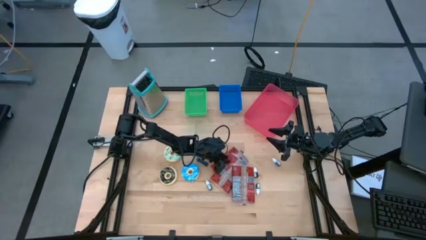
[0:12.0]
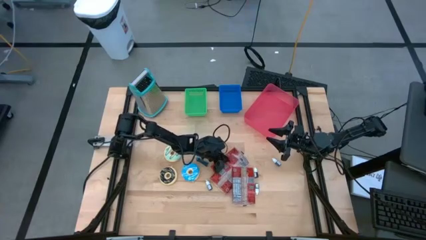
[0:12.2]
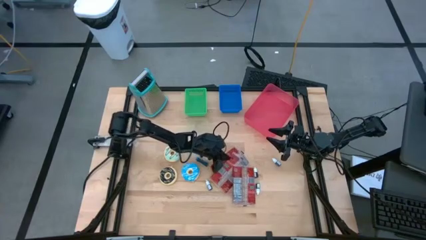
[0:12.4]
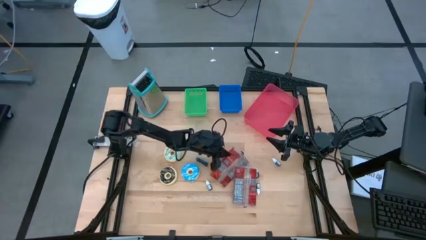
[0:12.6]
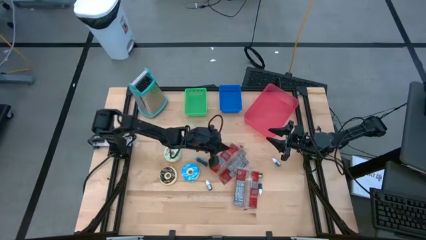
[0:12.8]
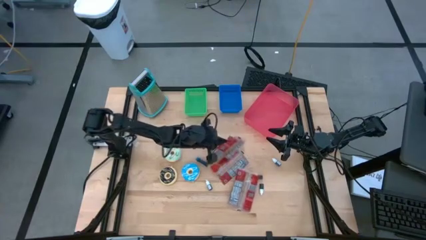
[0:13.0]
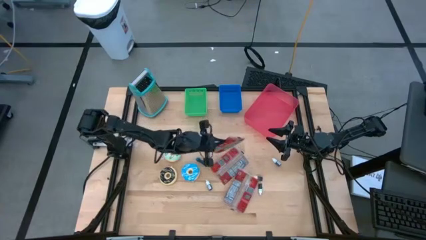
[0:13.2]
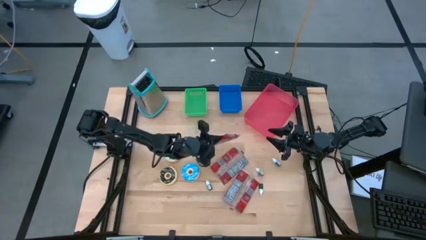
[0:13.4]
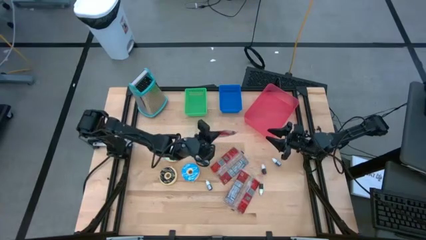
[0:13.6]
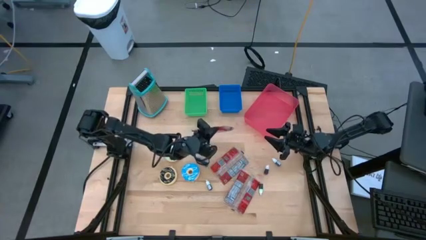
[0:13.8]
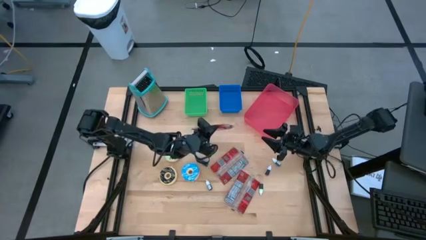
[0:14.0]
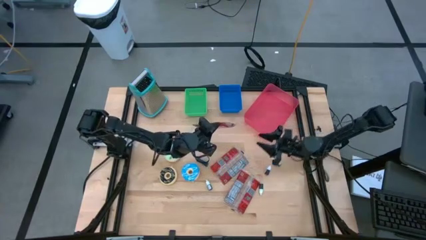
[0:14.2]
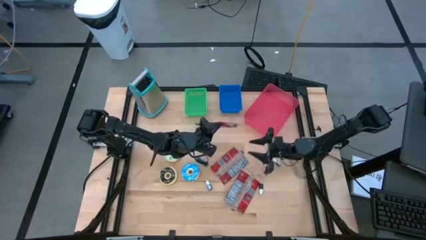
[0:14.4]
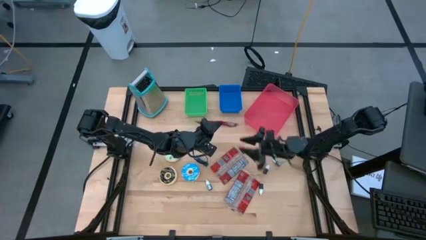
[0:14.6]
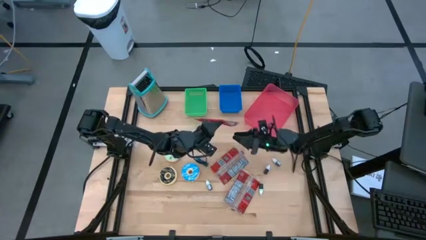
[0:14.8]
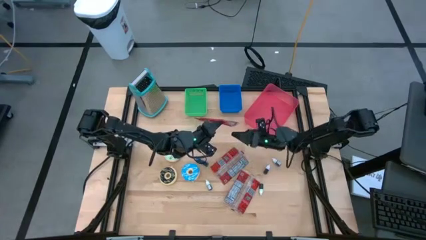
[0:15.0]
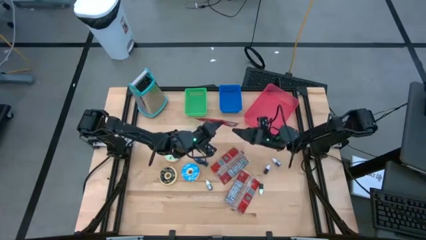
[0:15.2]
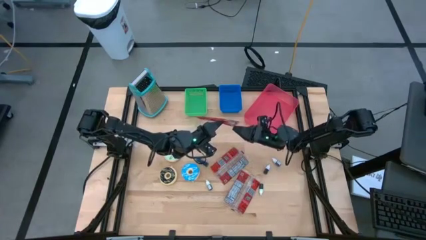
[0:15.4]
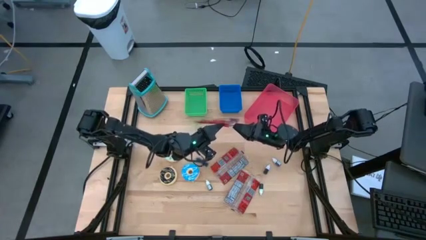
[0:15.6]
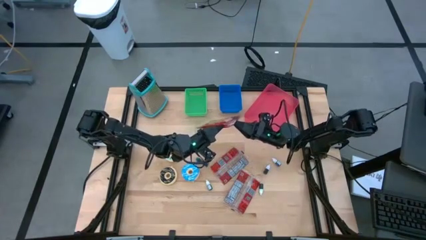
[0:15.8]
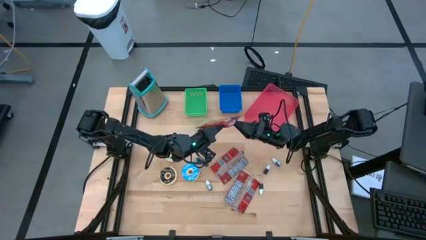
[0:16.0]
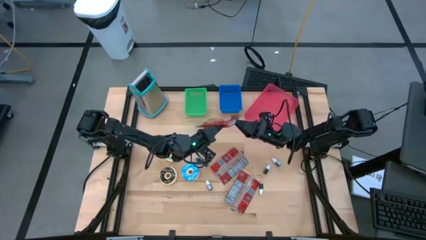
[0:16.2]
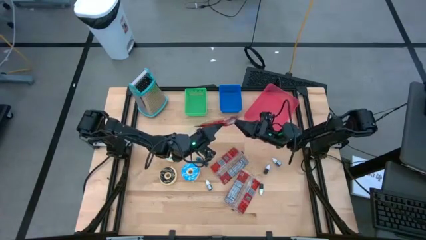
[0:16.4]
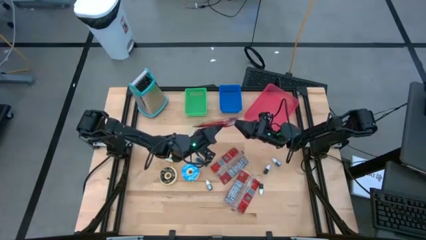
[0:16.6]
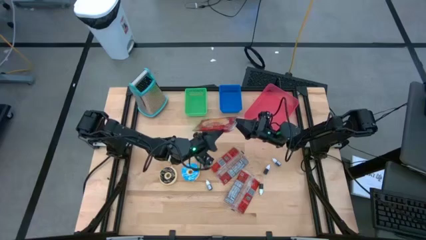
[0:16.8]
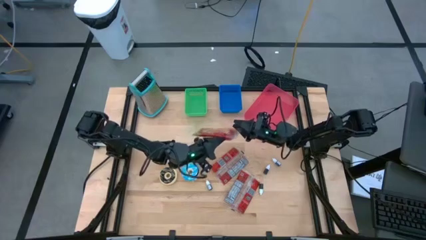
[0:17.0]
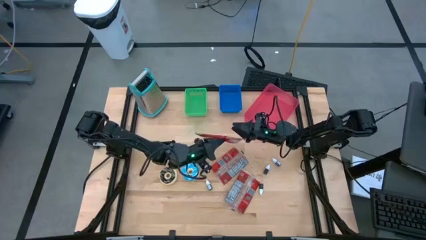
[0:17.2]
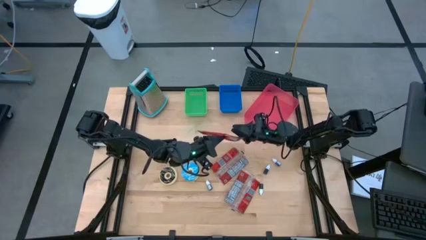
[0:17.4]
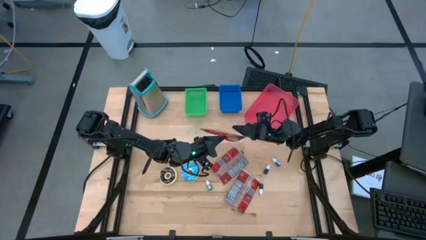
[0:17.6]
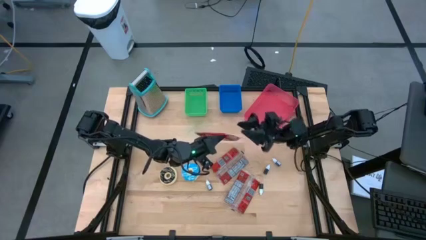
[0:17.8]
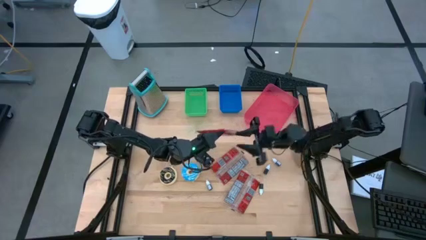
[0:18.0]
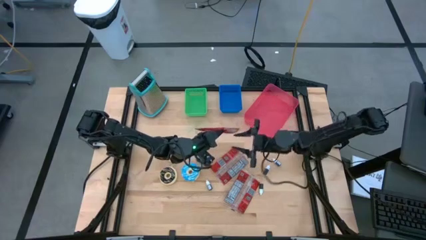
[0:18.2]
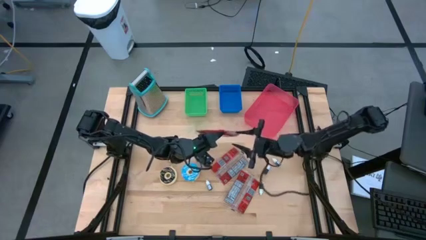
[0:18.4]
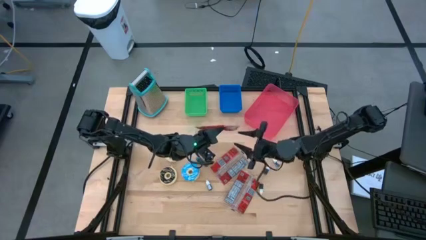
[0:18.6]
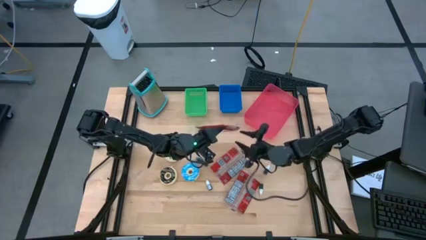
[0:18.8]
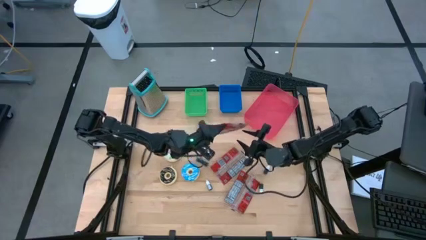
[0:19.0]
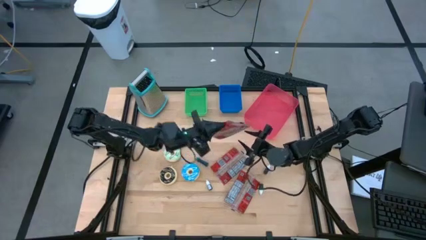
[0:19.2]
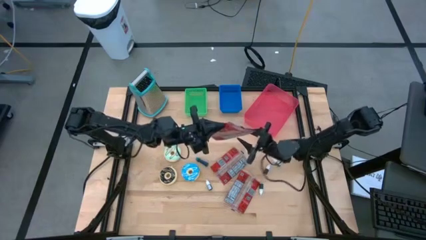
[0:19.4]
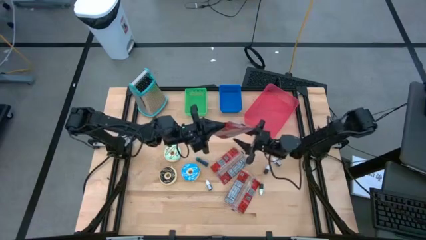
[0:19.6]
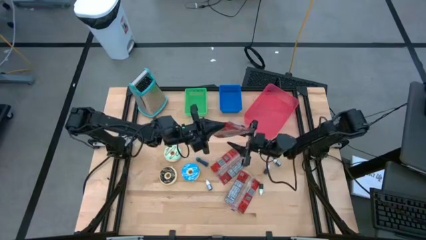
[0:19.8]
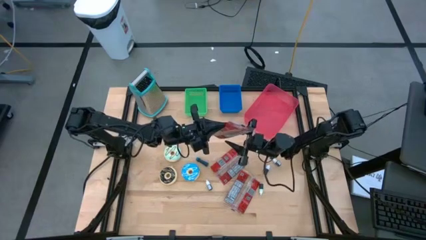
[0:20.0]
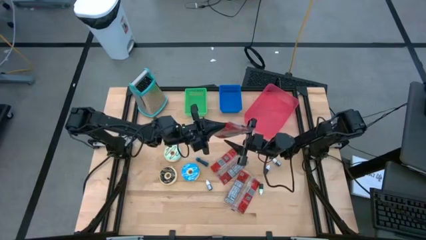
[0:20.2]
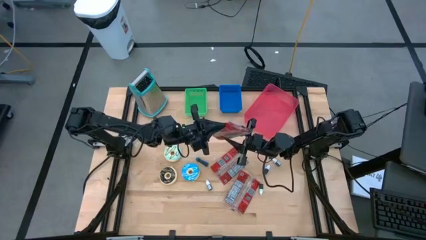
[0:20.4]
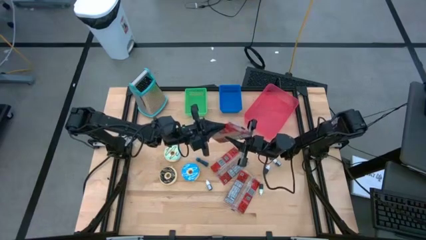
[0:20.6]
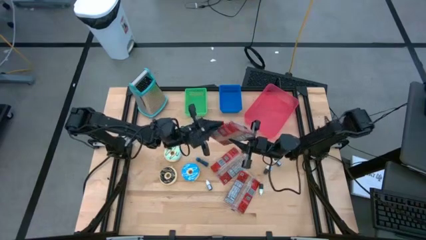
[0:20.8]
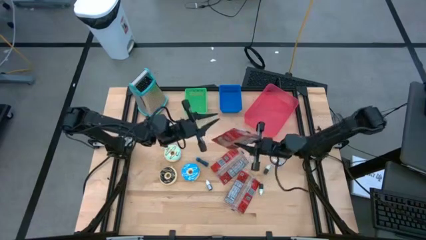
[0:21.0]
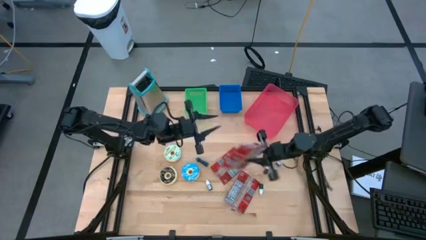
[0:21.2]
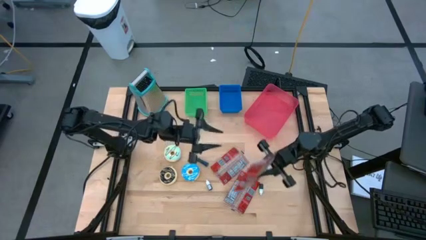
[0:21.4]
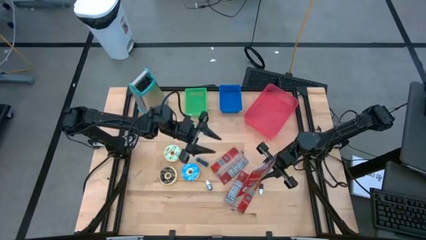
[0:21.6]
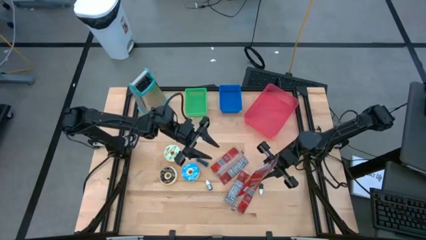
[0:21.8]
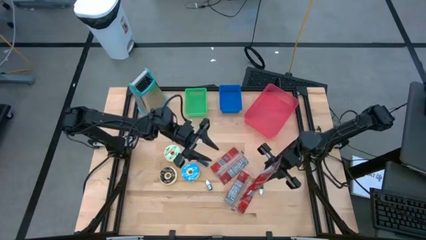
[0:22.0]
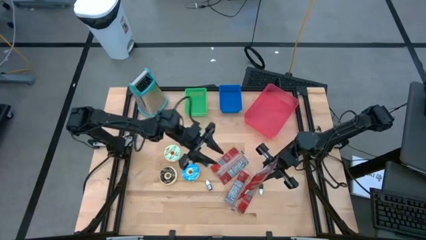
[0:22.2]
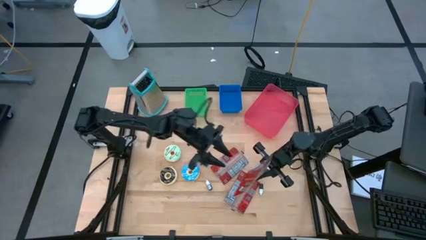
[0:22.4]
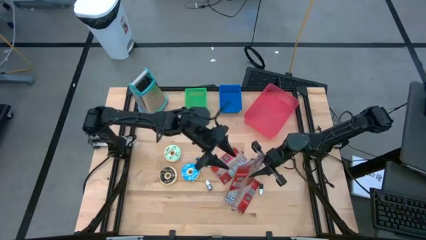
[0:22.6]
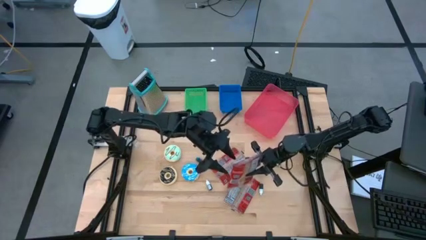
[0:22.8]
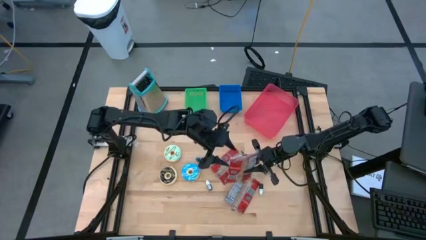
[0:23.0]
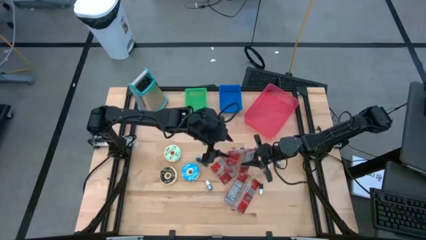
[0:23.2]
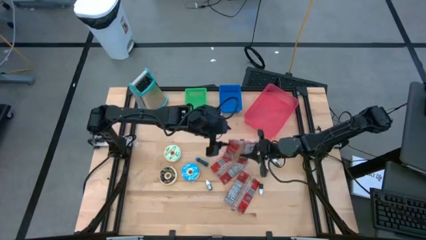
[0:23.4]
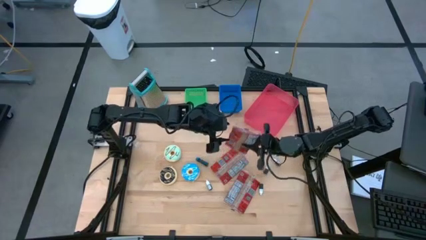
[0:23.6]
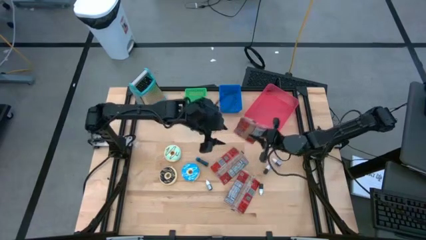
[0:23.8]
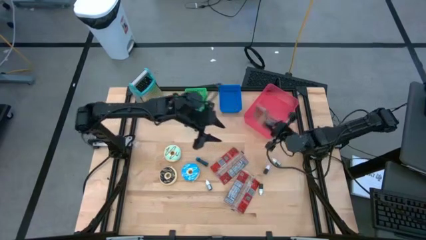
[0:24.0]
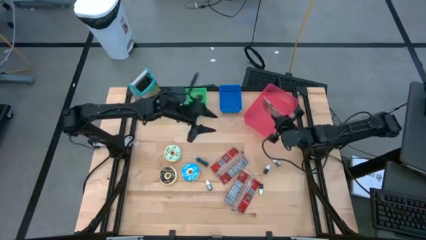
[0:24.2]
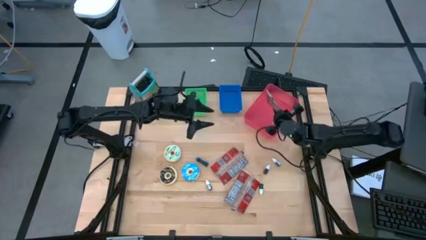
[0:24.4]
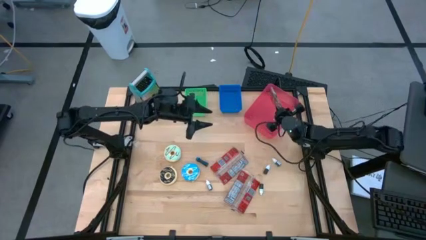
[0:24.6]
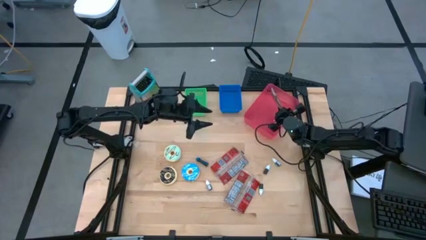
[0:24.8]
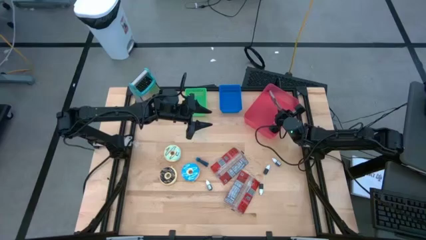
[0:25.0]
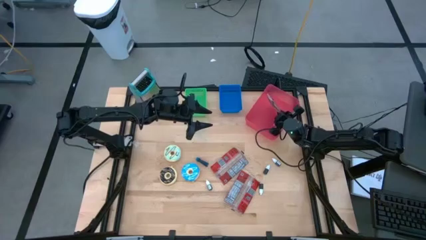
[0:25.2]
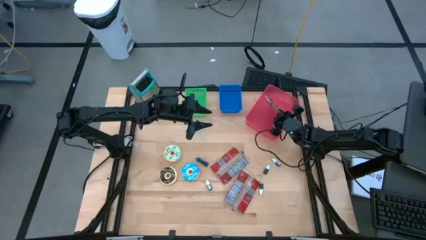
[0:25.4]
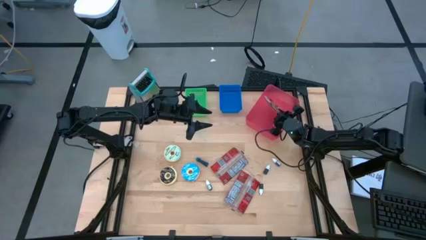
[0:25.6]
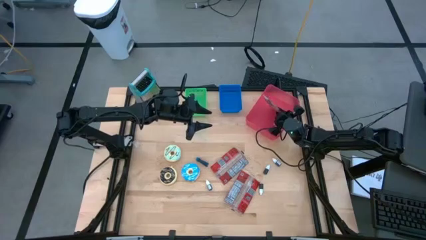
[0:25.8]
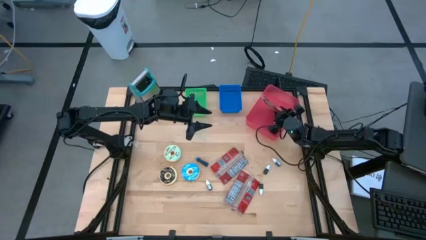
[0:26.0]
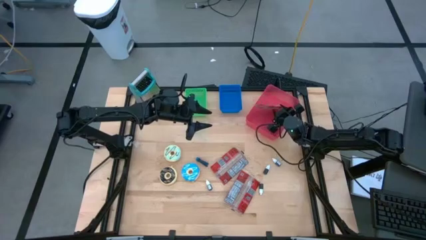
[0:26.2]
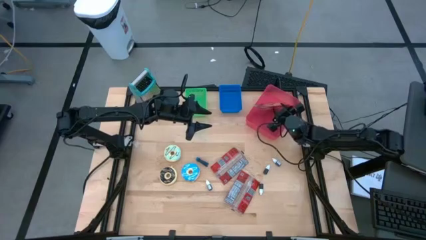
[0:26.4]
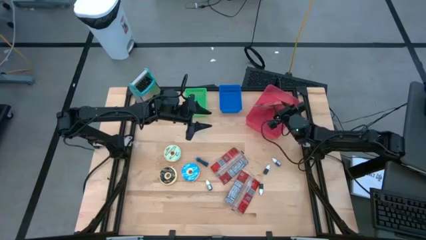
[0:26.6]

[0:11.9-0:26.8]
Put the middle red popcorn bag into the pink bin
